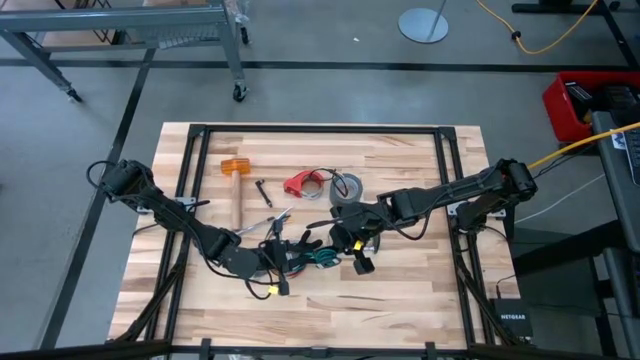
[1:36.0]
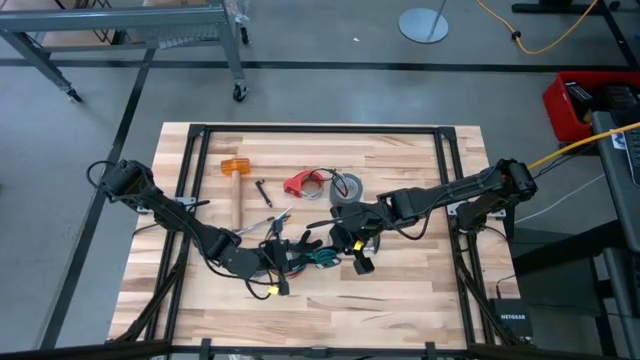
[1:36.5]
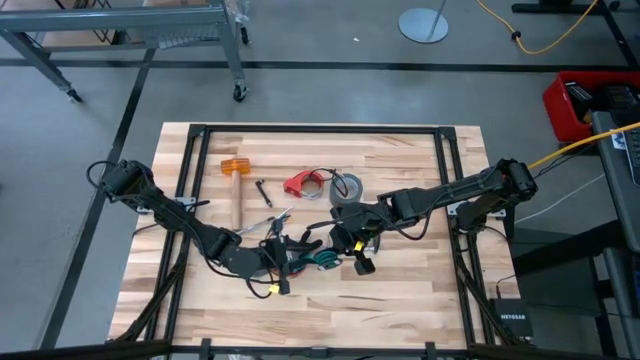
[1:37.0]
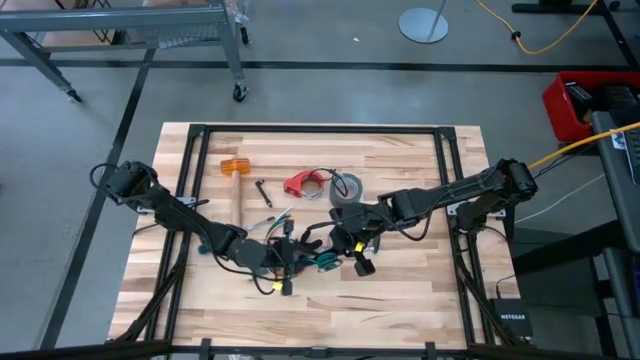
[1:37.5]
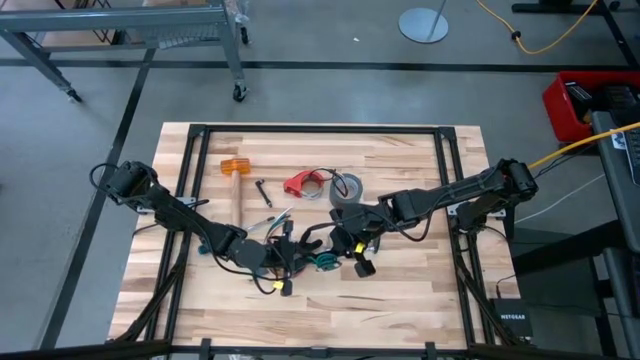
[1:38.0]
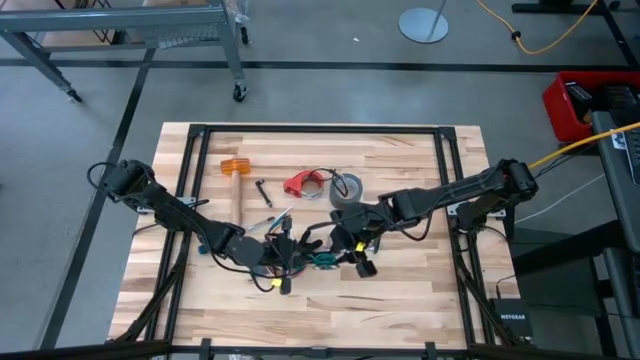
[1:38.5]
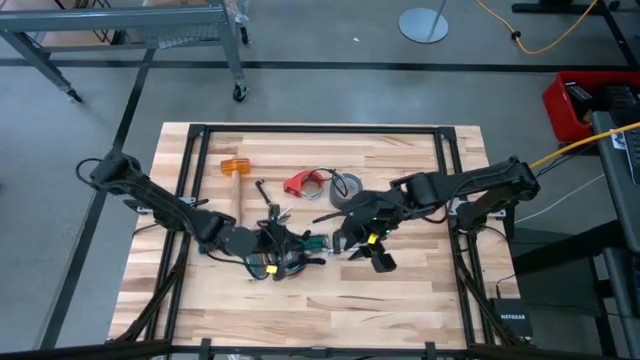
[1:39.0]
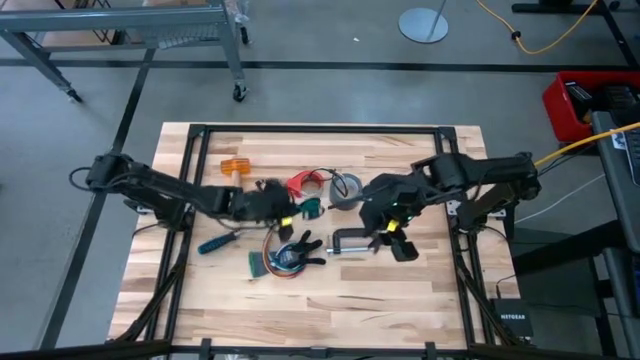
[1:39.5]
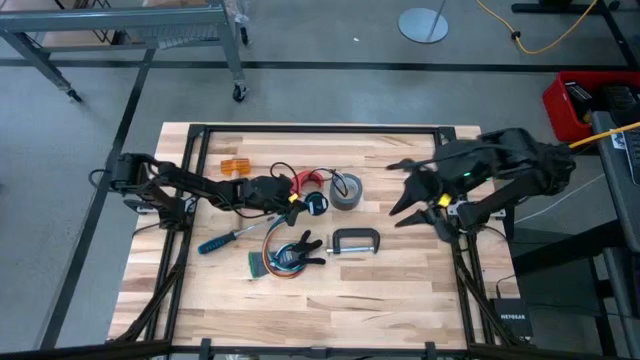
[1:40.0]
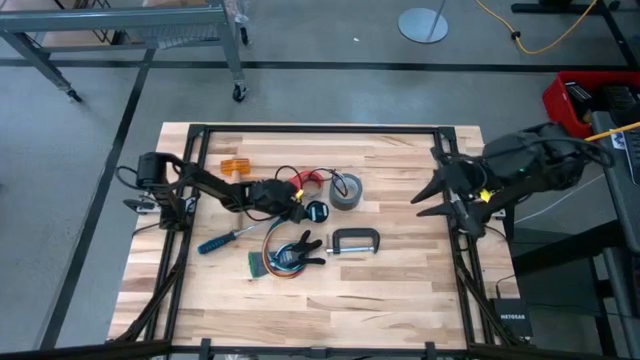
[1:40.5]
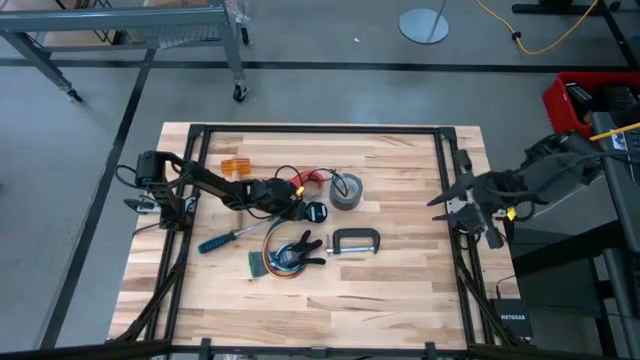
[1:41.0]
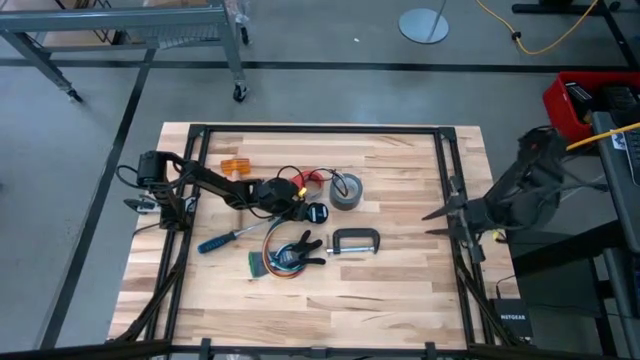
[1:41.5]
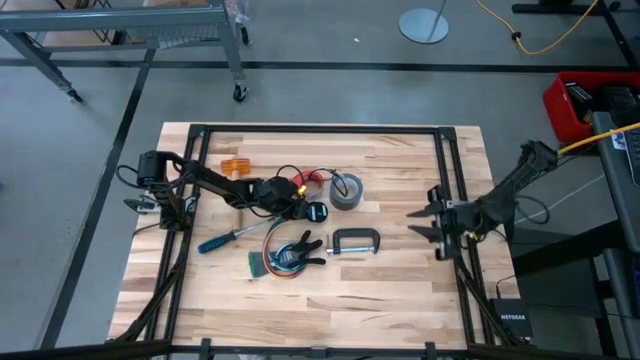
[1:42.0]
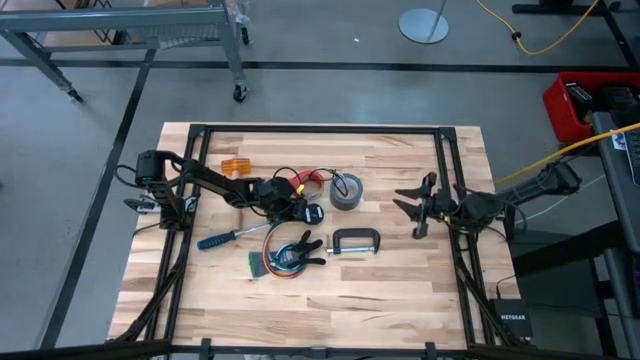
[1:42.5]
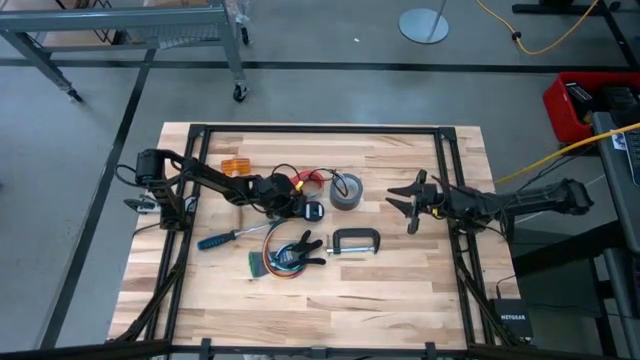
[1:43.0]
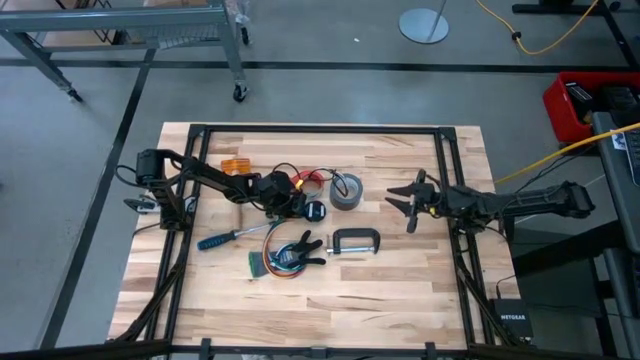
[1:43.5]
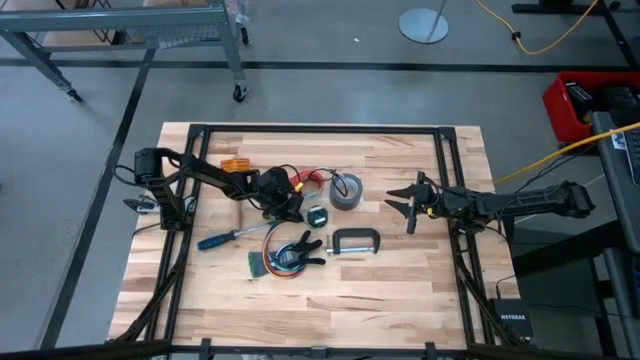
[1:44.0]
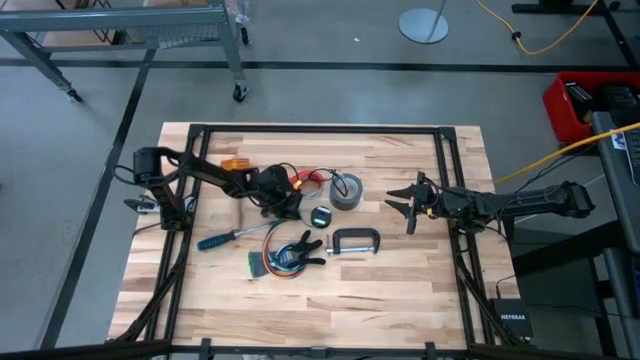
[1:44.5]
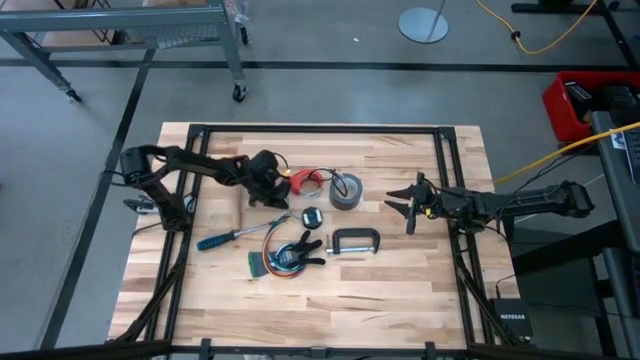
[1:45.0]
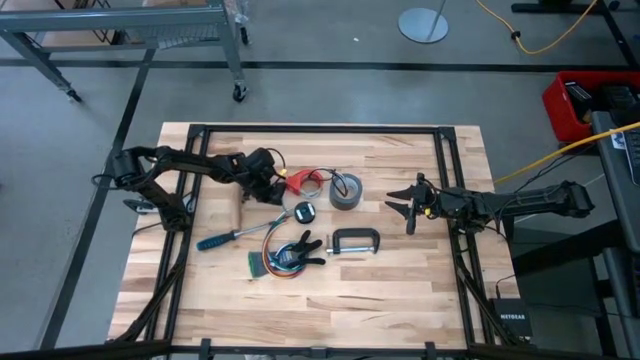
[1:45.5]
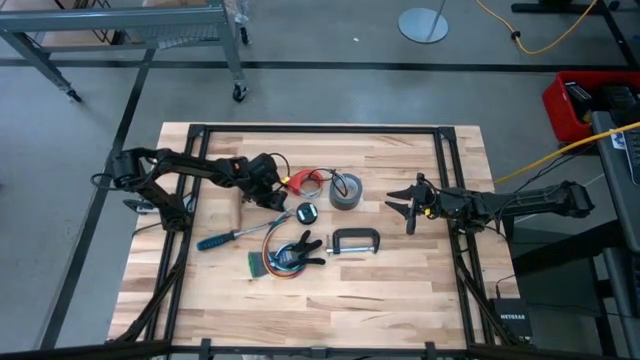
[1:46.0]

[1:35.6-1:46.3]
Task: Coil cords
Put down the spool with the blue wire on the table

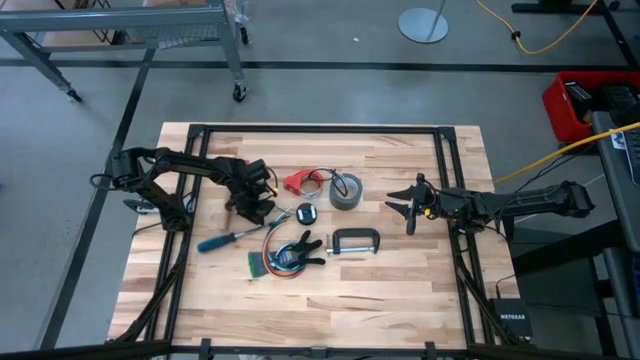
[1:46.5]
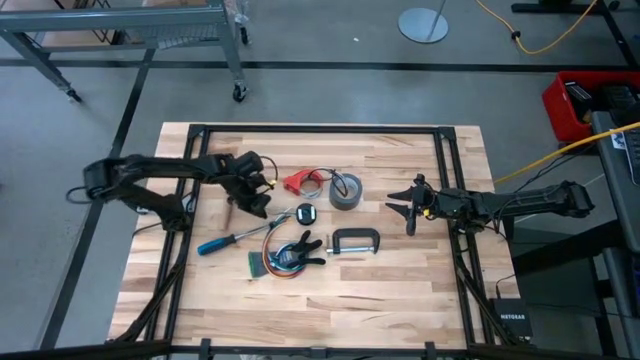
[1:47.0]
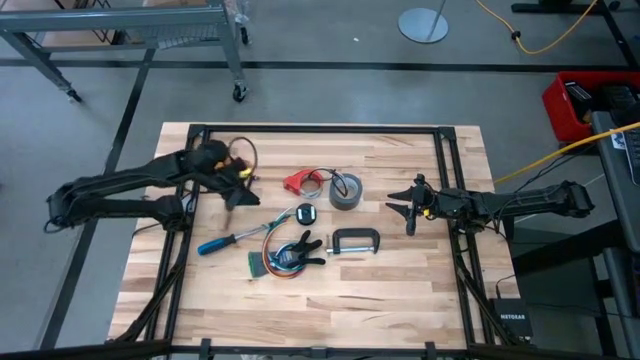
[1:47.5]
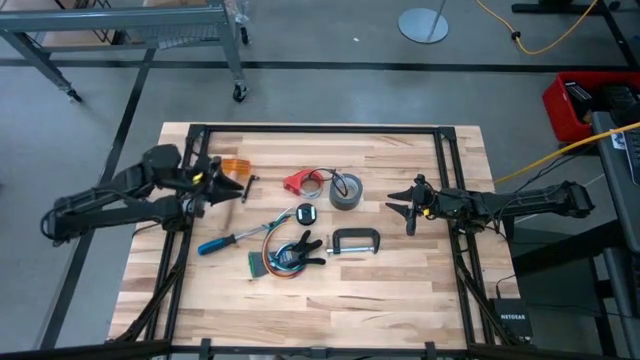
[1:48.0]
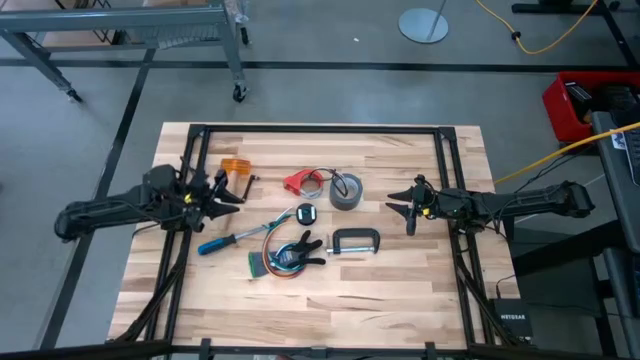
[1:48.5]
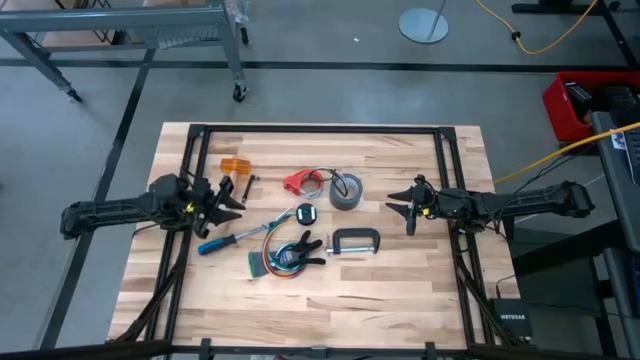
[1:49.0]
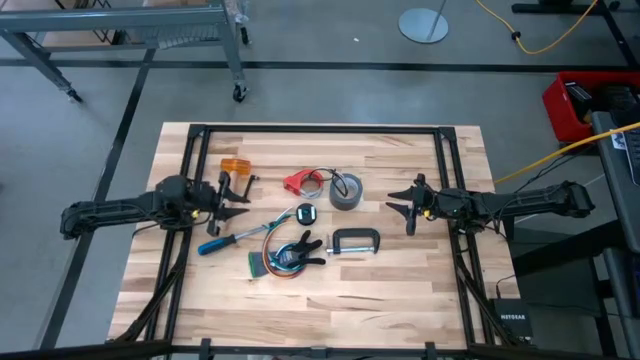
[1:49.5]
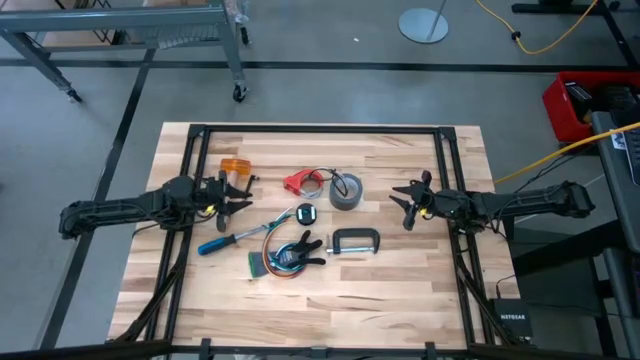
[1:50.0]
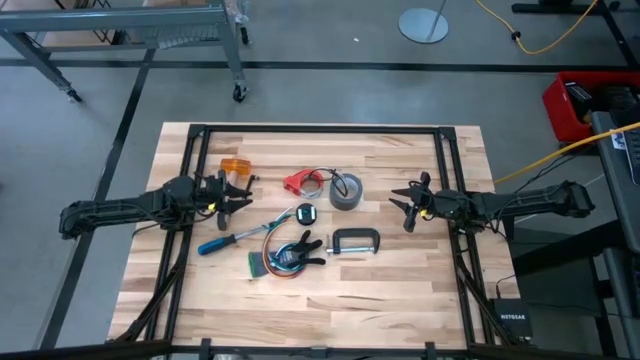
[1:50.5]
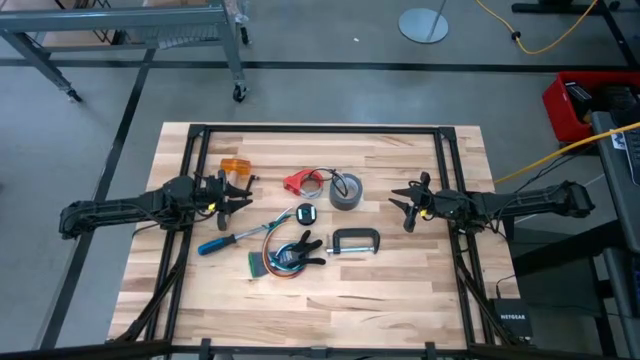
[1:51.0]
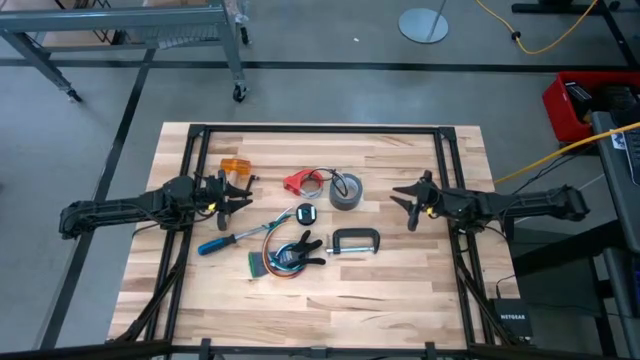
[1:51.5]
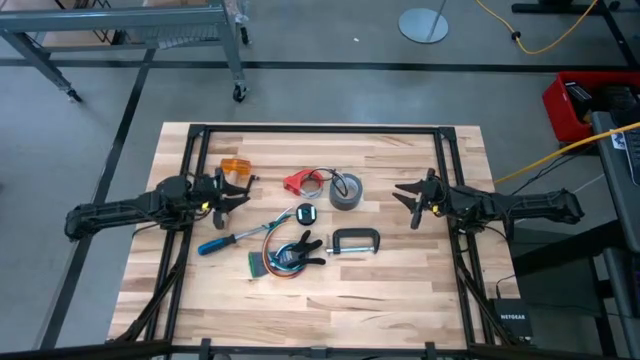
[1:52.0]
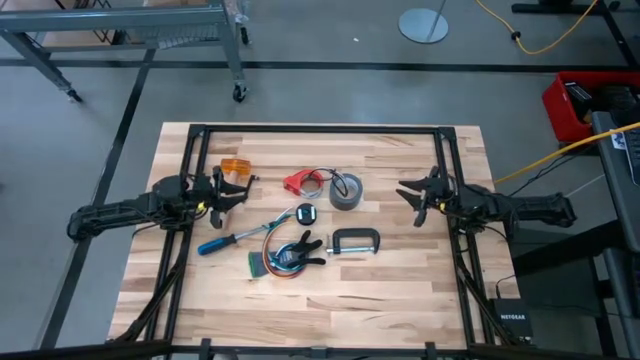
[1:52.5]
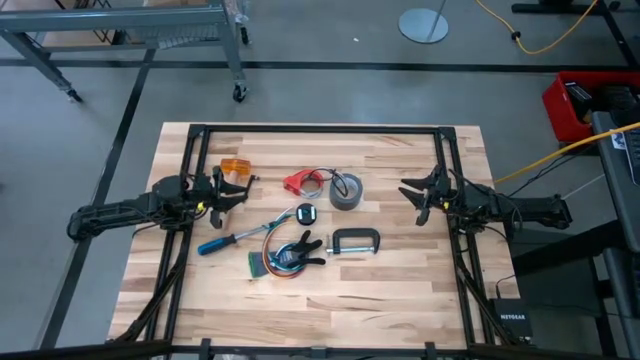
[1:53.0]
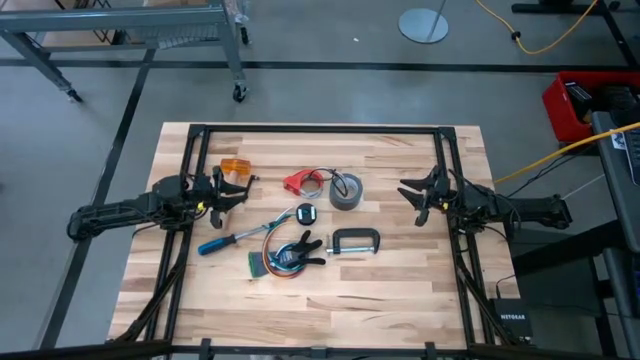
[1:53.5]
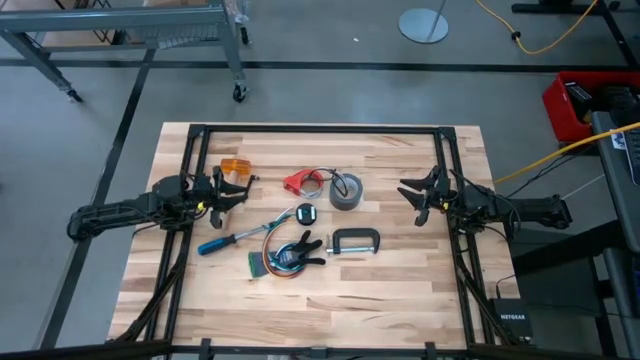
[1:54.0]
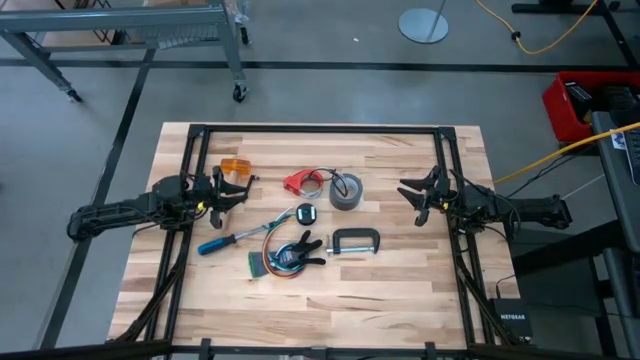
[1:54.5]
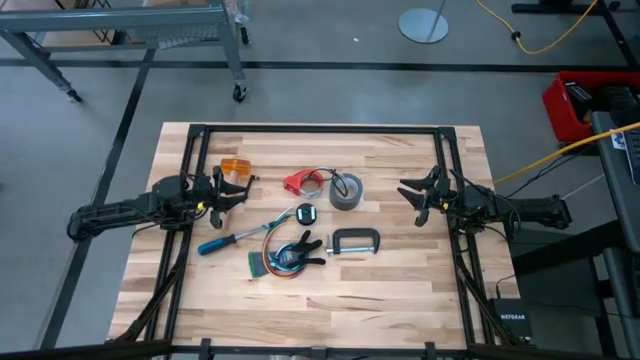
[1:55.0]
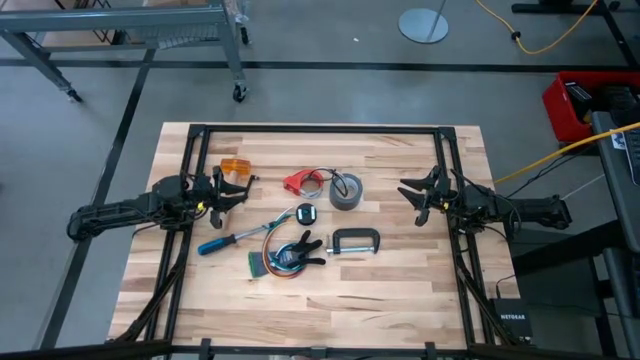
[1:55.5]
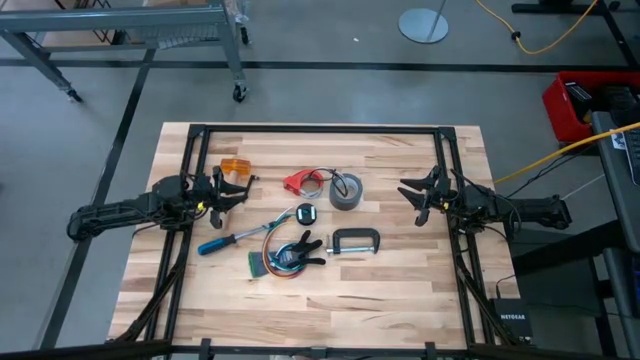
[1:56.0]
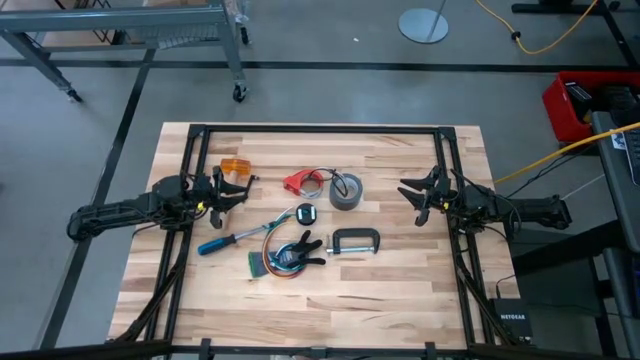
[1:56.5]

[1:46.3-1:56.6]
Return to Home Position
